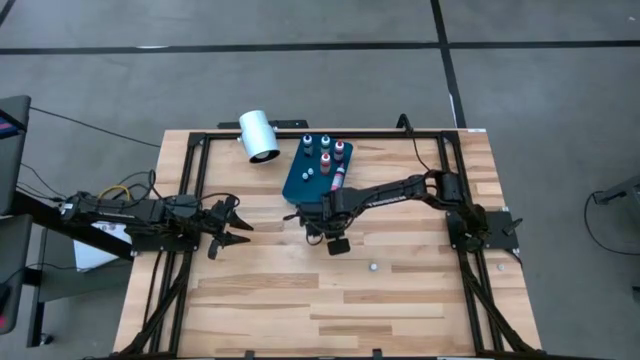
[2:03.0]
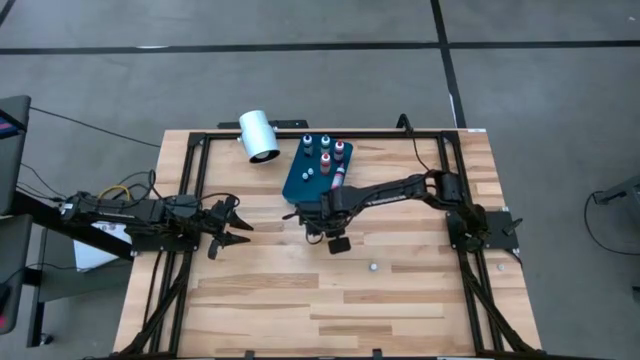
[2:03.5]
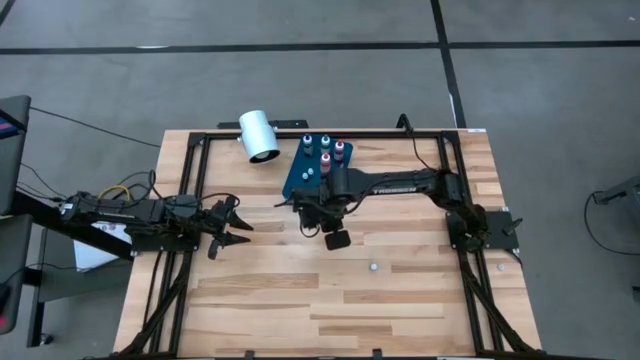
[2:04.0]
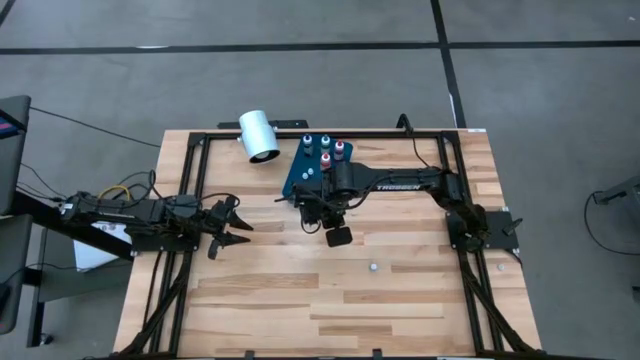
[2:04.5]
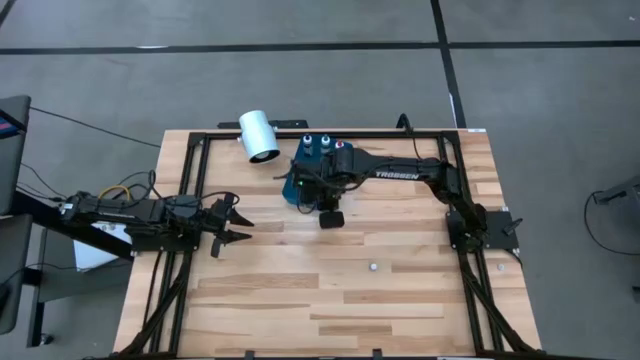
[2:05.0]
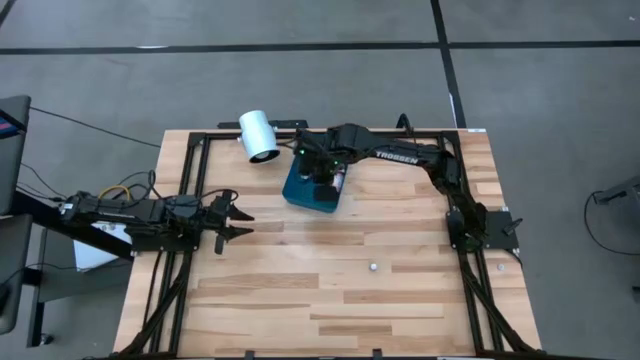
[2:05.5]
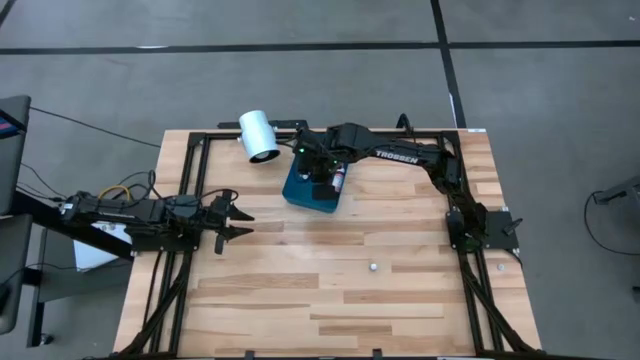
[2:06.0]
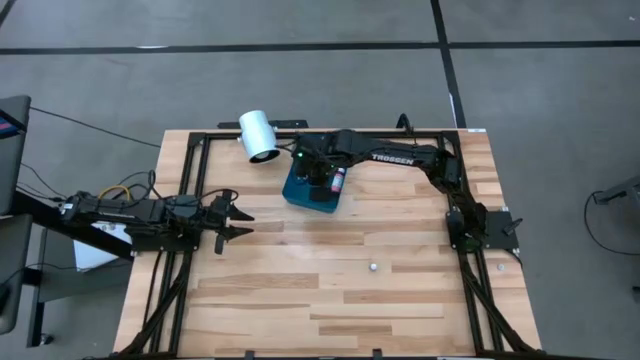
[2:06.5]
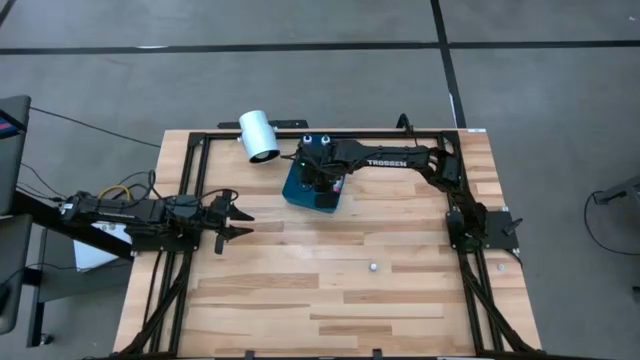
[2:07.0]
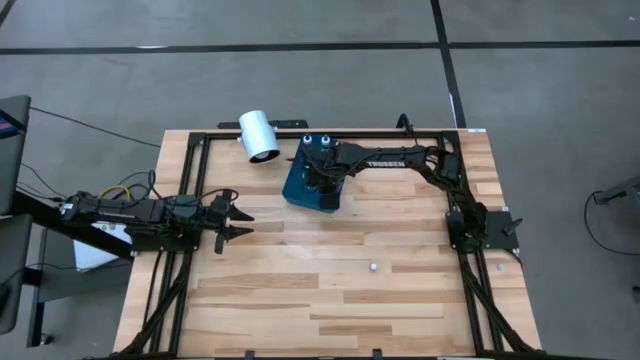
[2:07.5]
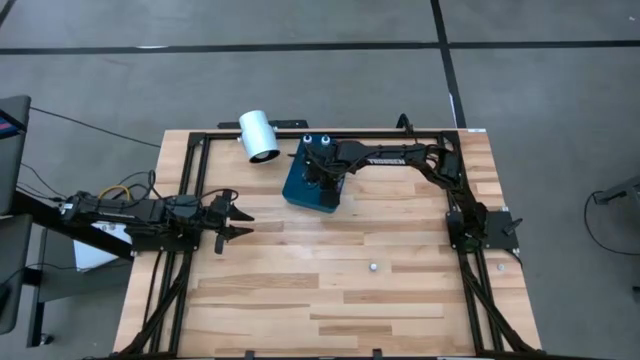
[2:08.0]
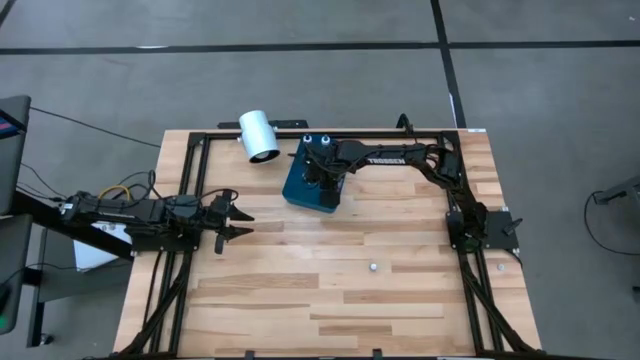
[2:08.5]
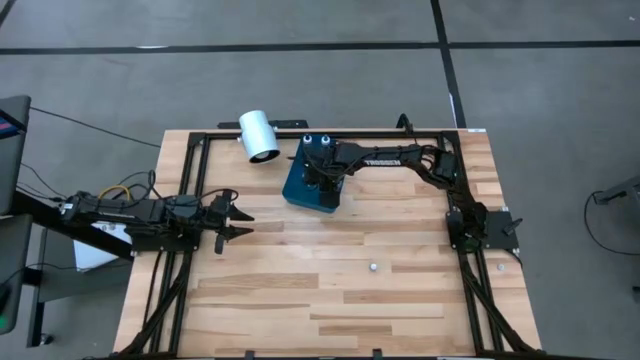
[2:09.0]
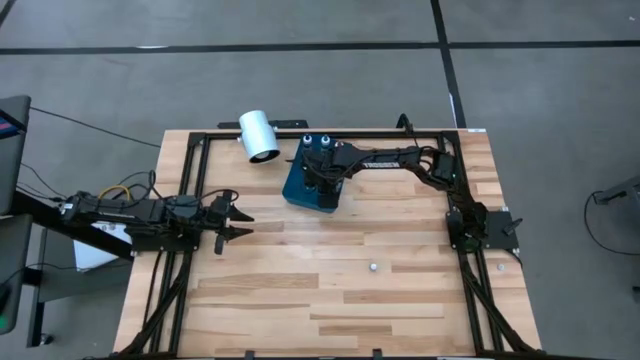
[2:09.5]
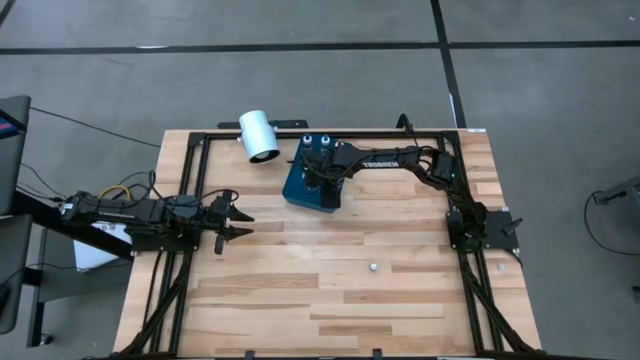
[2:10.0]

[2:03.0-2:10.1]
Task: Pick & Place food coloring
Put the small violet food coloring bottle into the blue bin

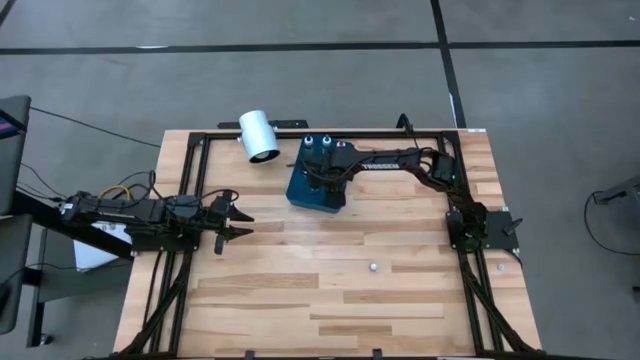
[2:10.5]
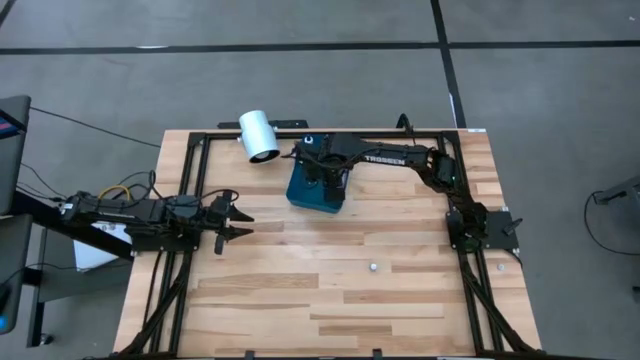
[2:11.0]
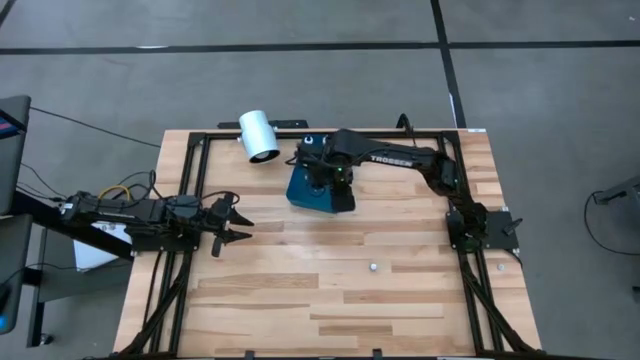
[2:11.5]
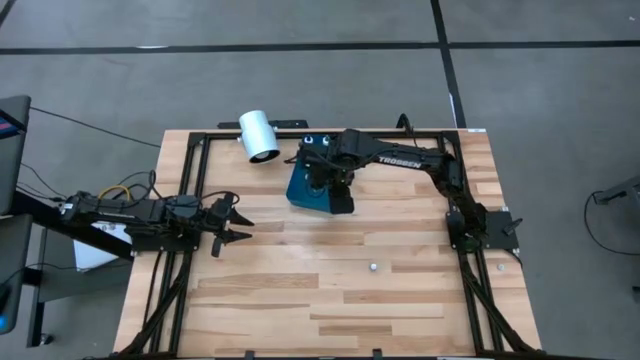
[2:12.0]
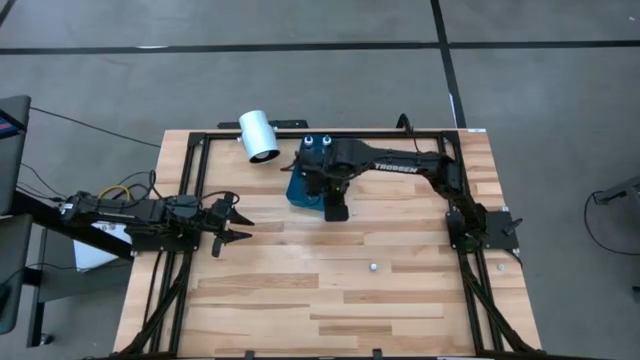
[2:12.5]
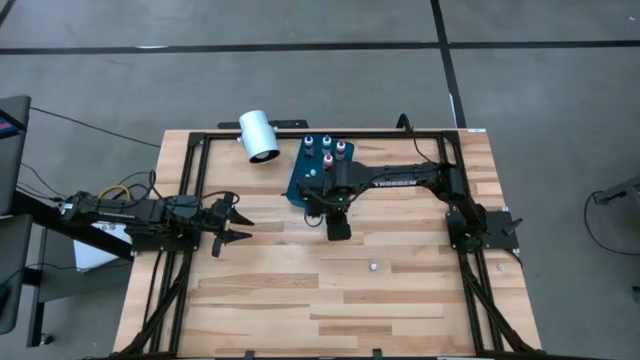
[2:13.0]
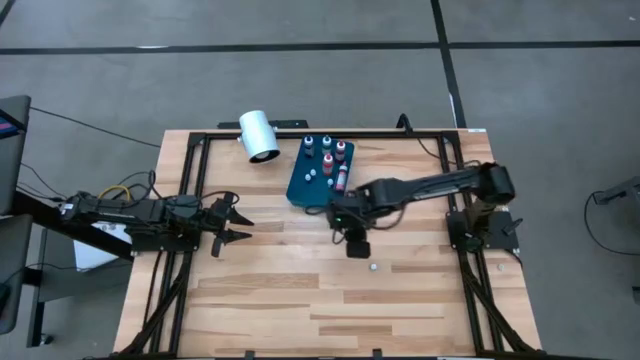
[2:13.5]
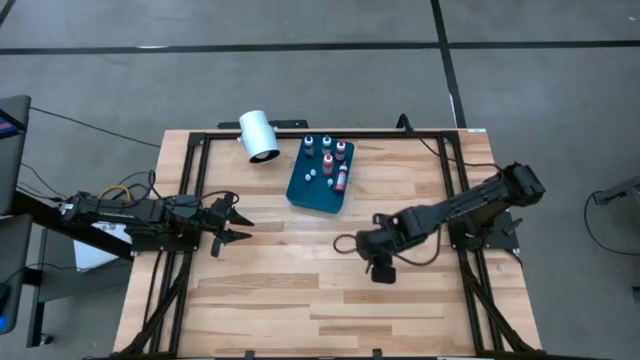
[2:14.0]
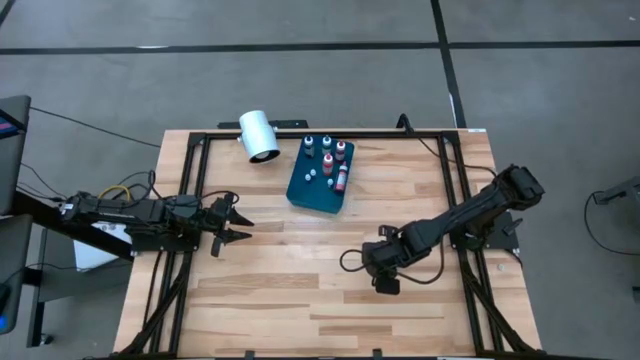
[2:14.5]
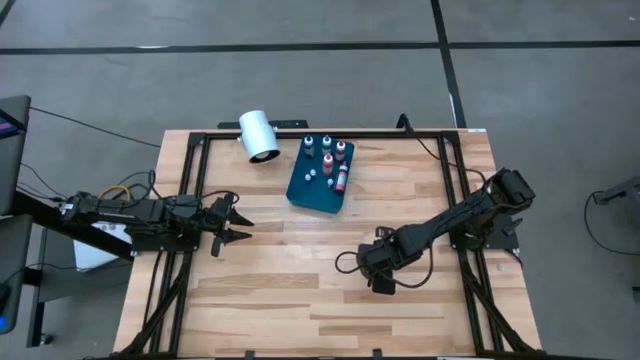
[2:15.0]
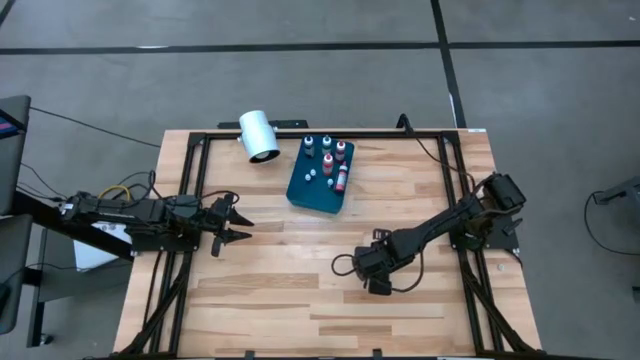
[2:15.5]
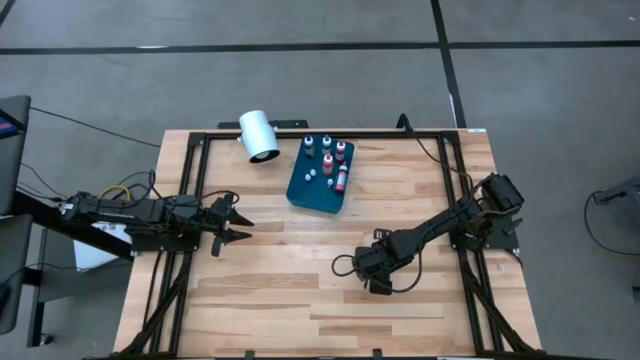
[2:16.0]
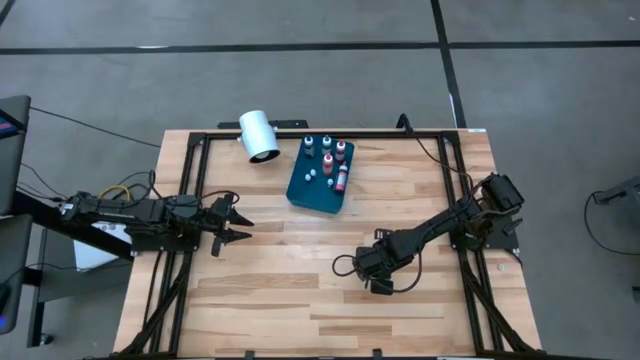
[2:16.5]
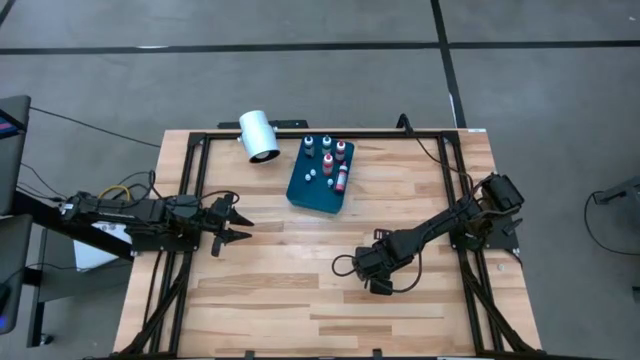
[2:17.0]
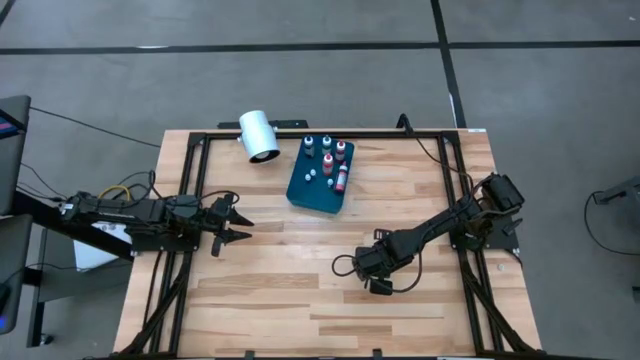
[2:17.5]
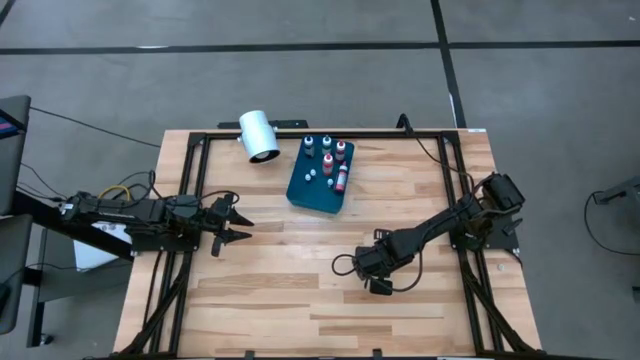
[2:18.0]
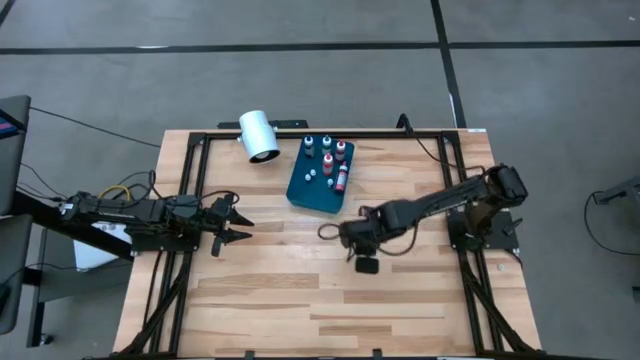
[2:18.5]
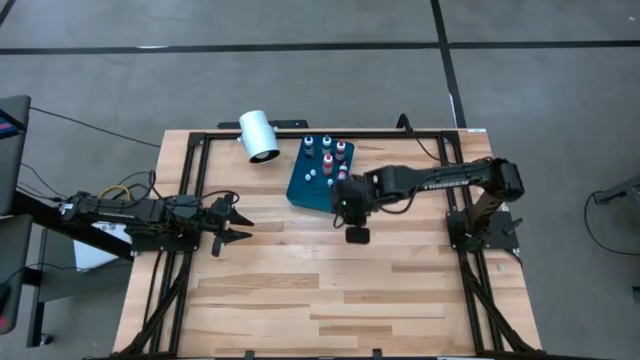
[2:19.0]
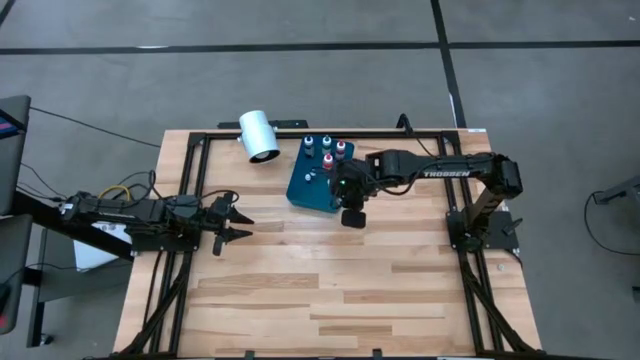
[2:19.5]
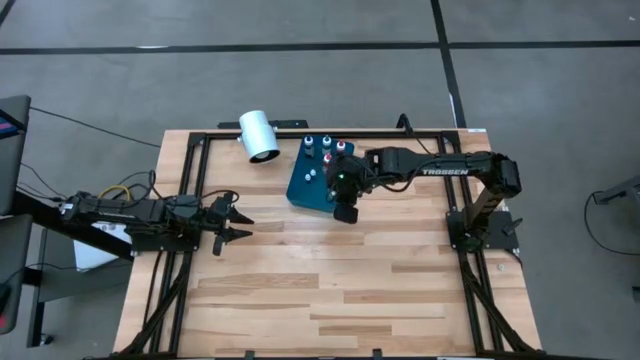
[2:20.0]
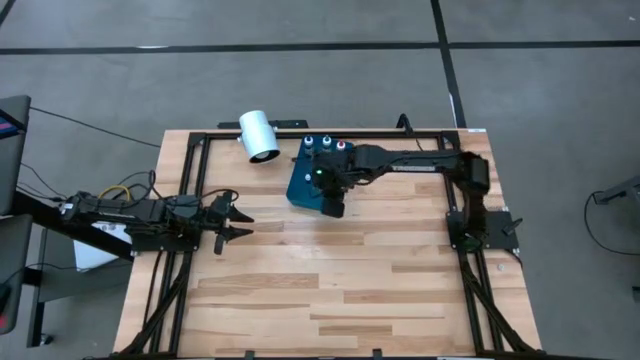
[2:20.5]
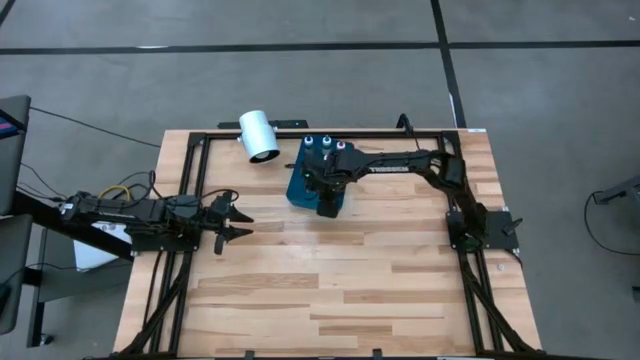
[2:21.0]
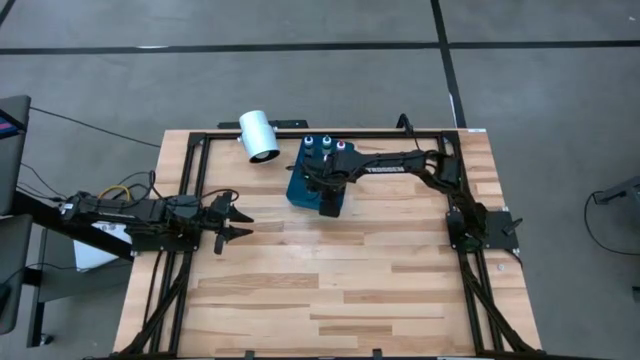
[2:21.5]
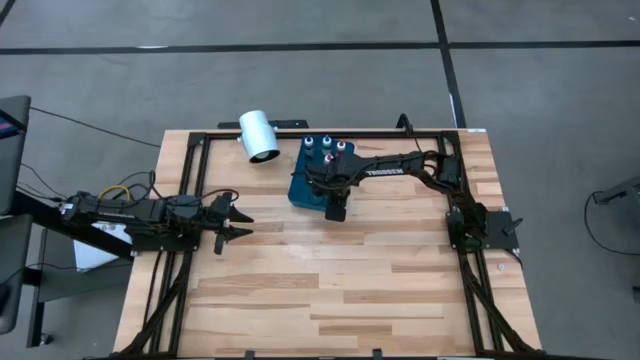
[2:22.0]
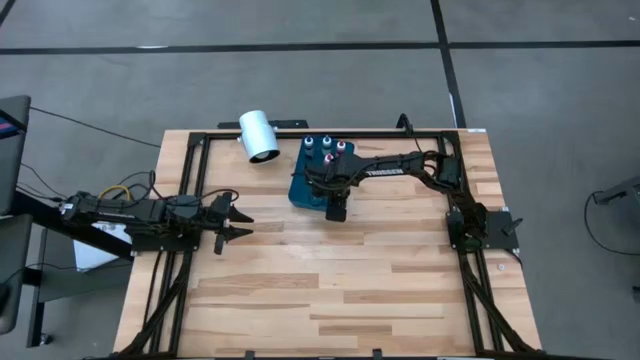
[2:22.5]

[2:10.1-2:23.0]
Put the small green food coloring bottle into the blue bin

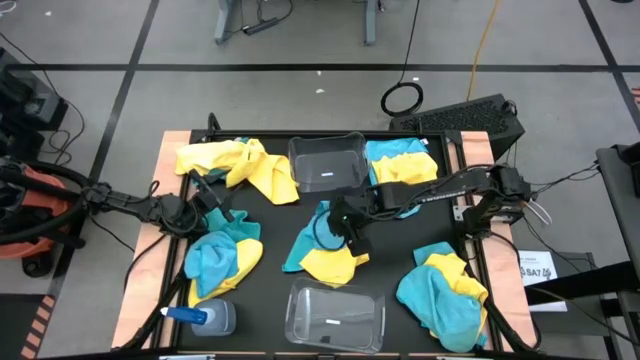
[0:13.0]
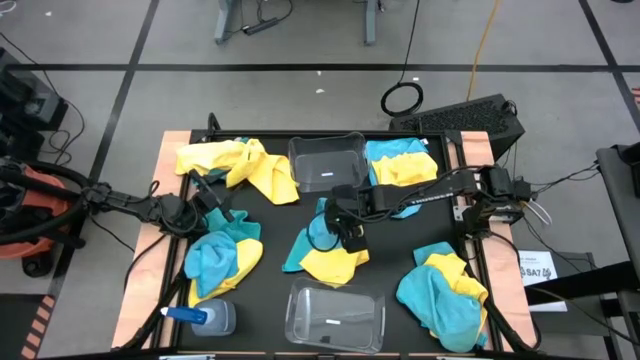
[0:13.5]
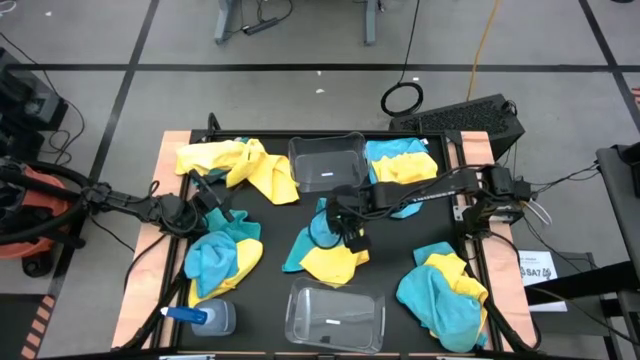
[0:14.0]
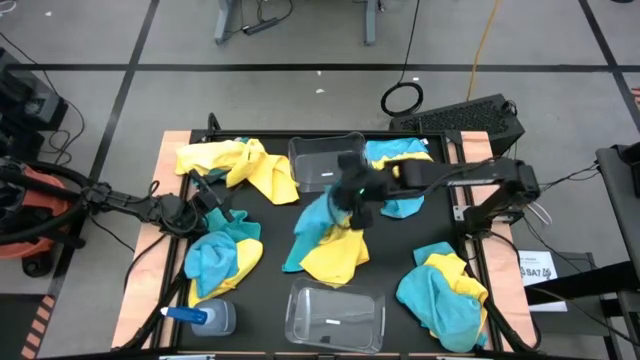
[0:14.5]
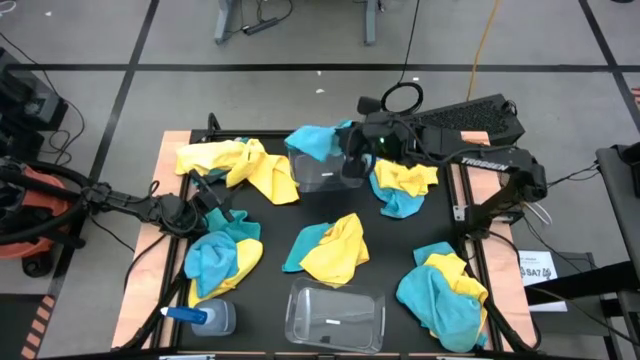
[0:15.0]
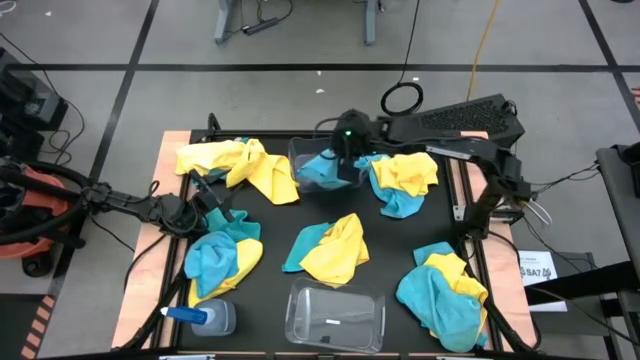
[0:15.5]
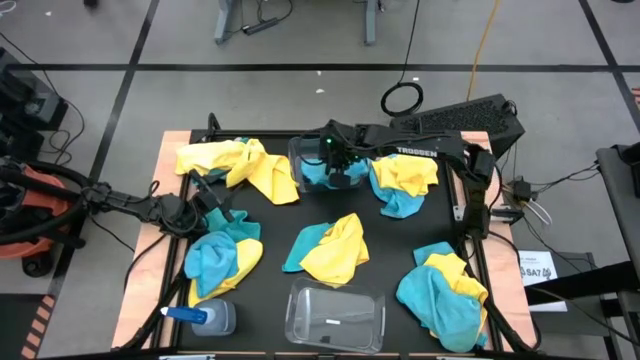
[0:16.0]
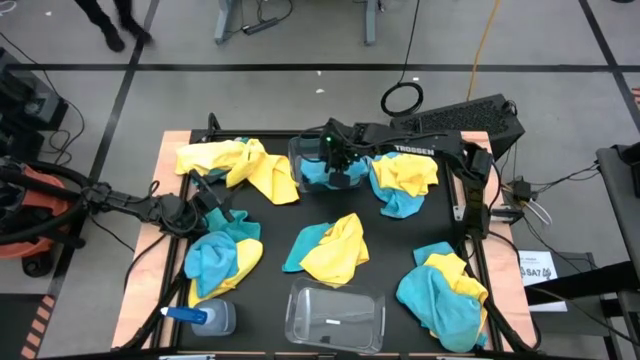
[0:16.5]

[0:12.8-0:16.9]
Task: Sort microfiber towel by color & place in baskets
Put the blue microfiber towel into the top transparent bin
